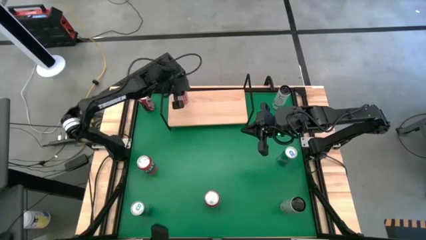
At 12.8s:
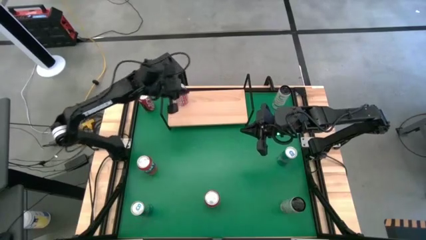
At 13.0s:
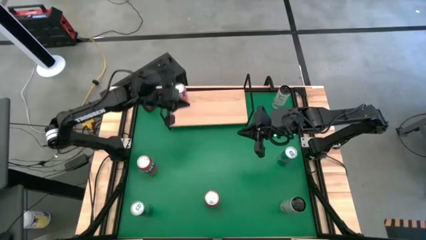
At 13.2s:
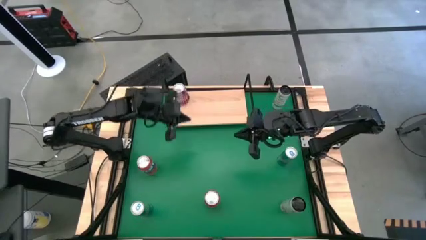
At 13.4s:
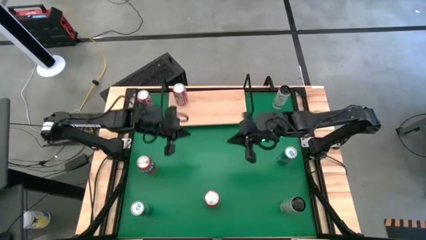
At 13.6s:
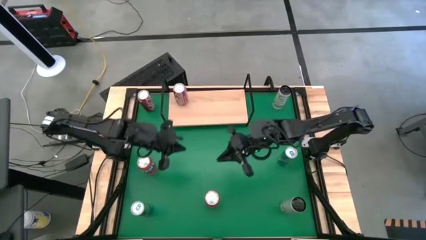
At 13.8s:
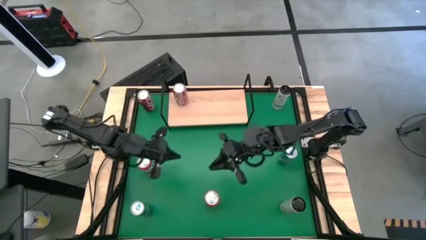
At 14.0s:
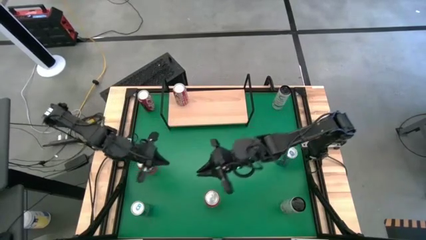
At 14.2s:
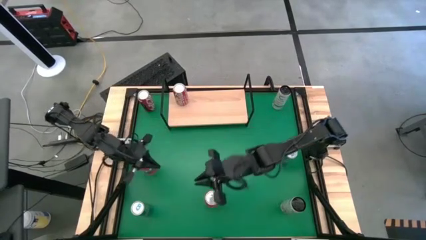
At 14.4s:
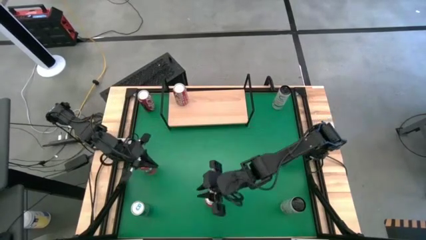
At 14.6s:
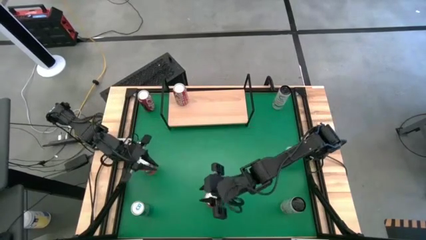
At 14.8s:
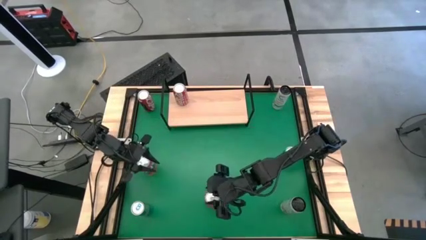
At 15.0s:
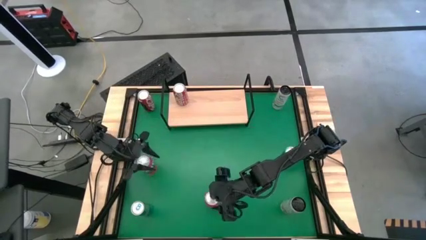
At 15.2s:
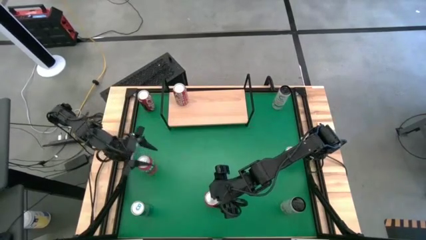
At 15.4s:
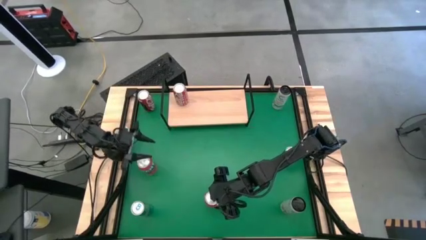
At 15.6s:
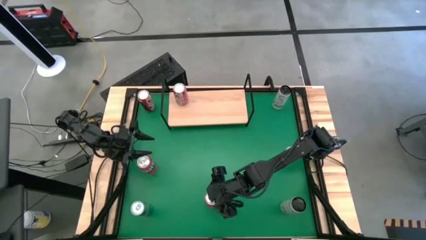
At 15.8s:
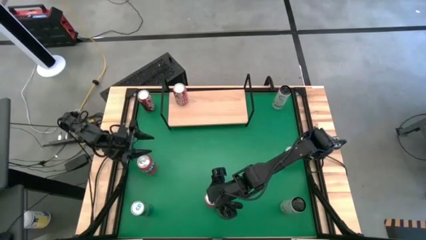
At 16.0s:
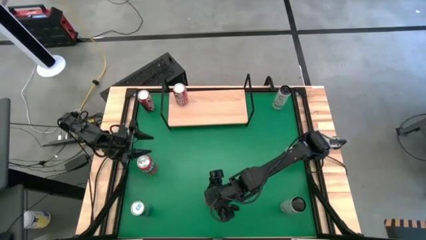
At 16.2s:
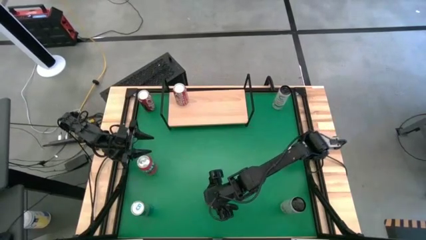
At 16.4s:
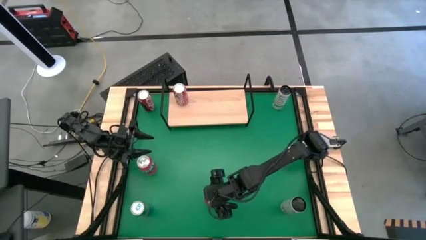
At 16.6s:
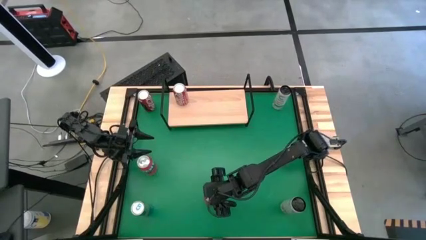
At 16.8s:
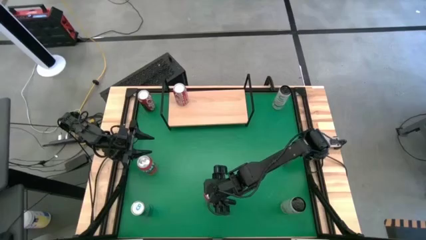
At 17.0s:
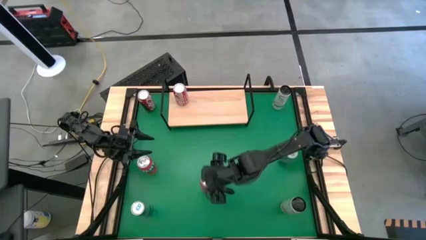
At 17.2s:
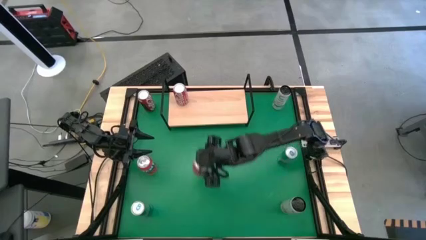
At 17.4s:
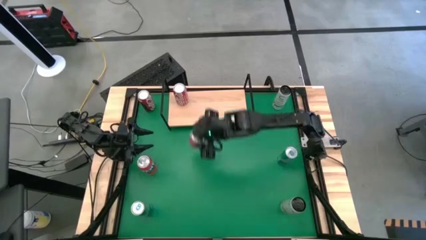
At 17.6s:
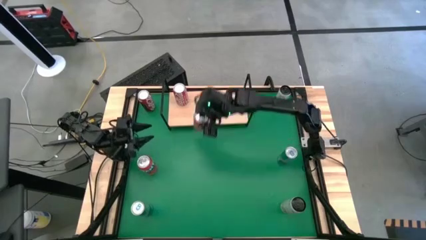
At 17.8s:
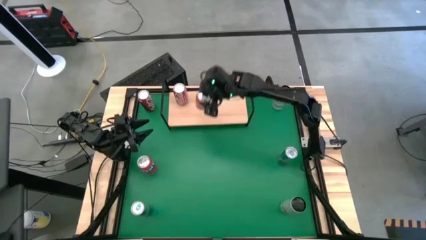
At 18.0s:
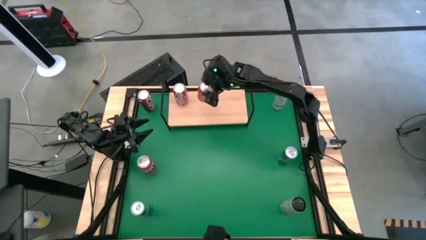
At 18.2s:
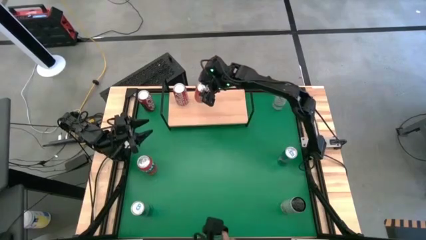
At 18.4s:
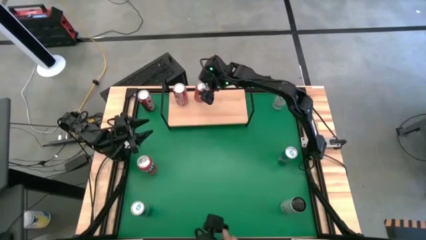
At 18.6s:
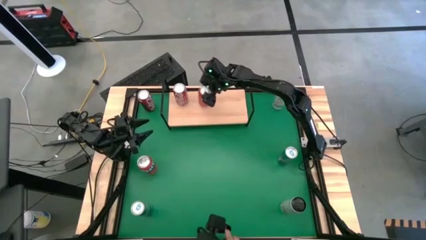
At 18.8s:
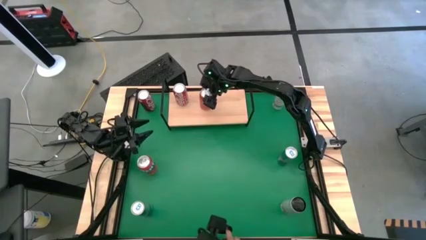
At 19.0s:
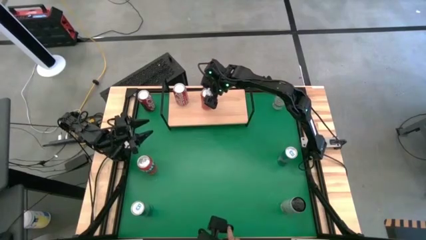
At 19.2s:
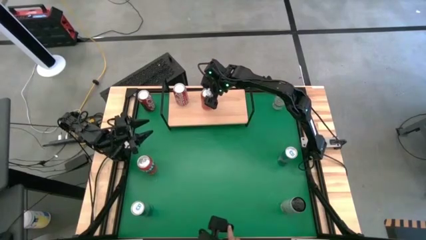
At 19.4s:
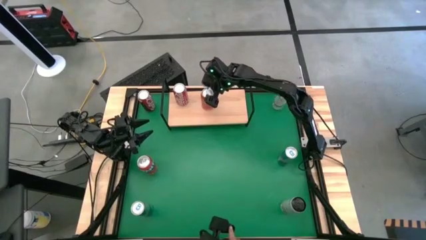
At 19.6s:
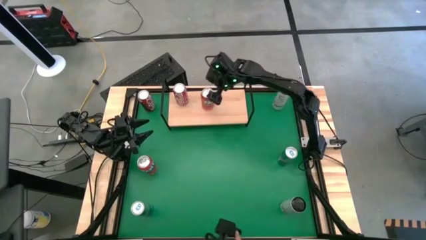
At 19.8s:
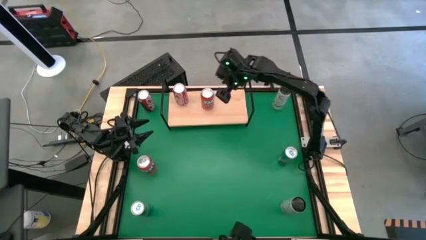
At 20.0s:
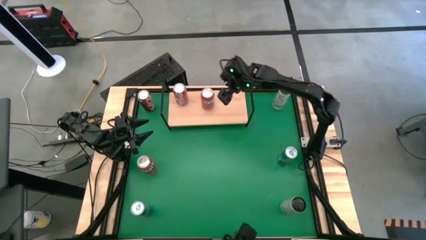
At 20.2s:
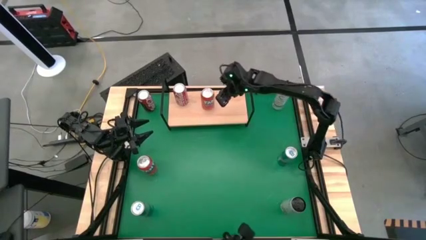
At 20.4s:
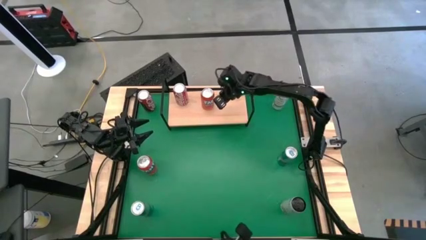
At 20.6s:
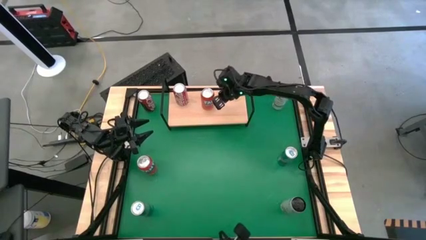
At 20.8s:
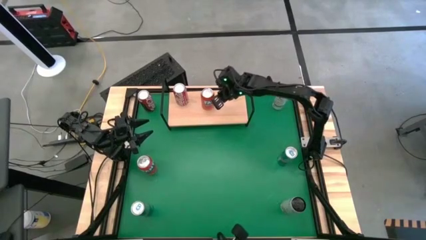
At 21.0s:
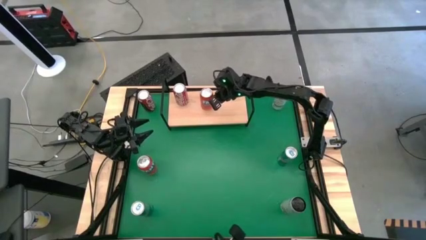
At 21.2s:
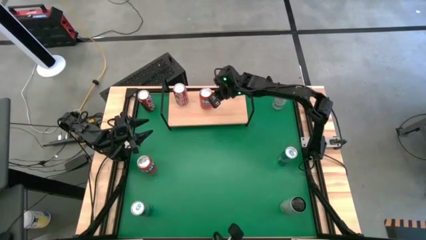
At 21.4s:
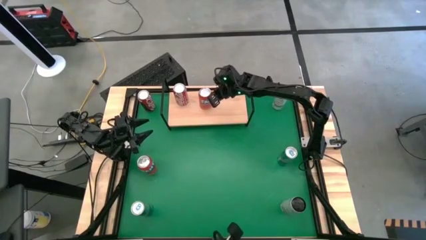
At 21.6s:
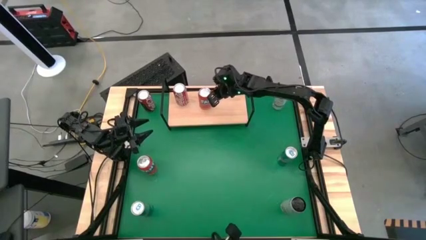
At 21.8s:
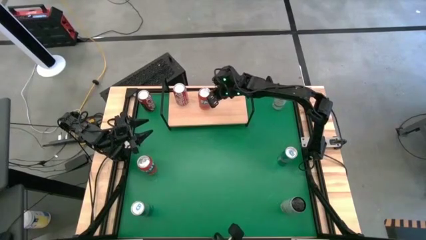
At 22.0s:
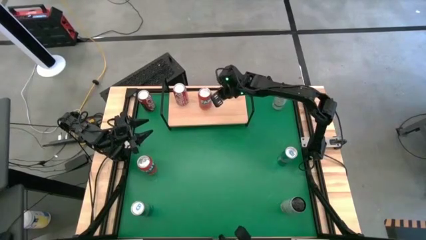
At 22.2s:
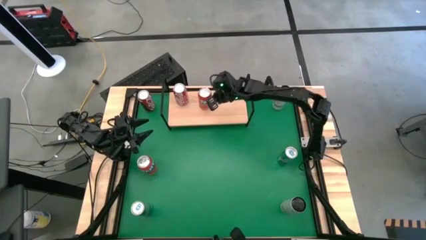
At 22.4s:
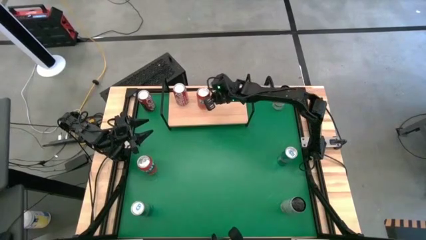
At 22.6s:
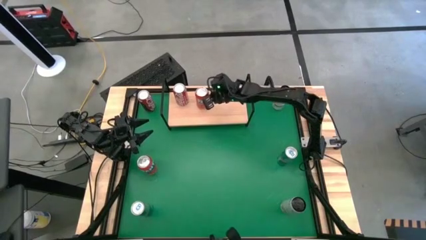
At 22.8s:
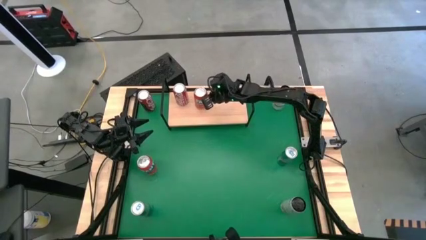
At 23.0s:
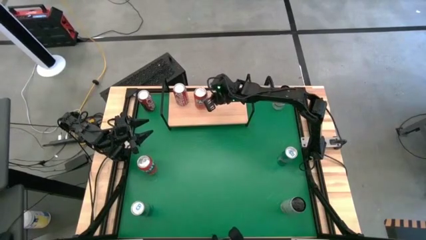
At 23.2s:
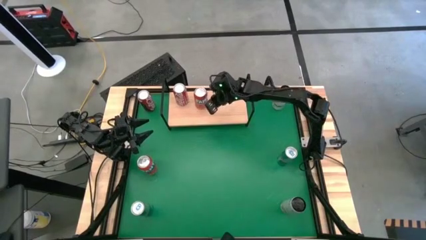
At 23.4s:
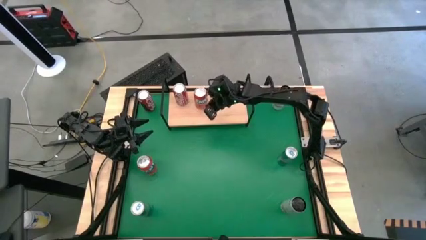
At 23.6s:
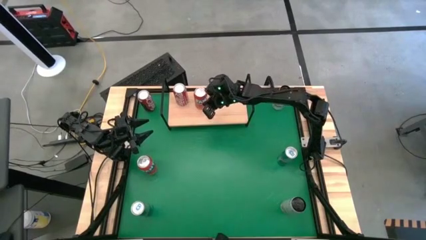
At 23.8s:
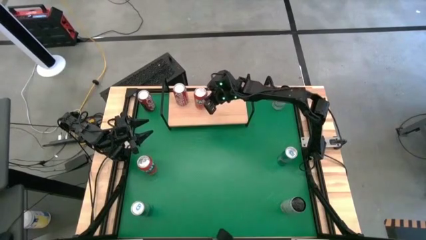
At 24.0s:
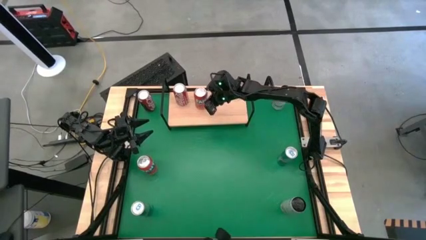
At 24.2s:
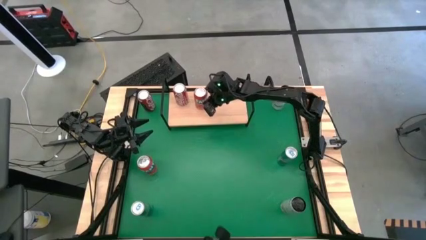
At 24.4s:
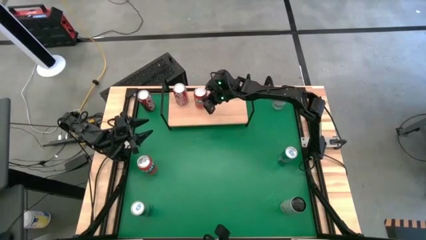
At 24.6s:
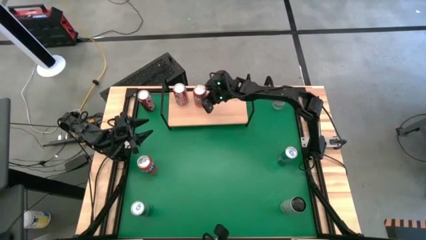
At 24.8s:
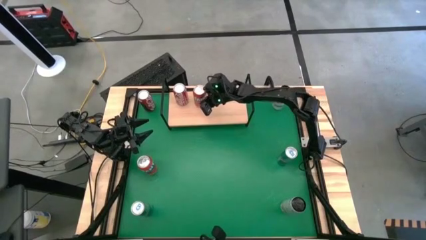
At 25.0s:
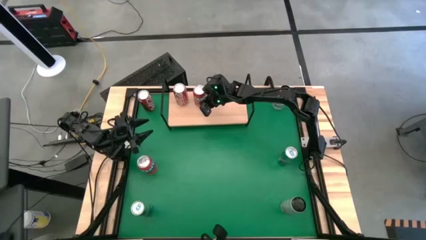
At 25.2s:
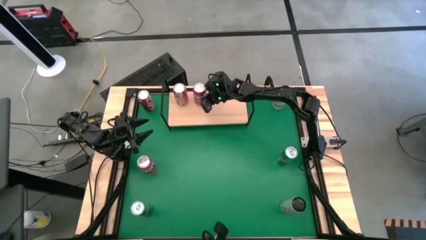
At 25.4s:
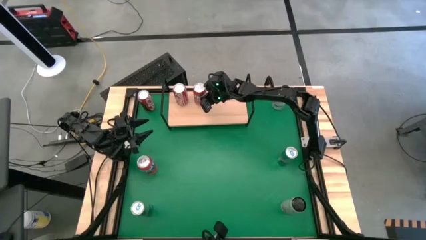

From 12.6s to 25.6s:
Task: Place canned beverage on shelf
Put the bottom red soda can on the shelf

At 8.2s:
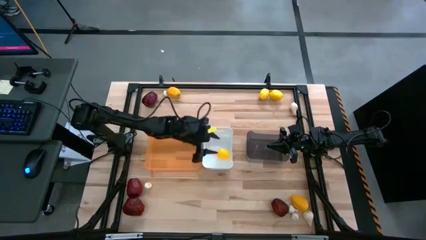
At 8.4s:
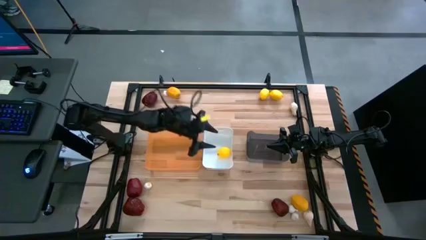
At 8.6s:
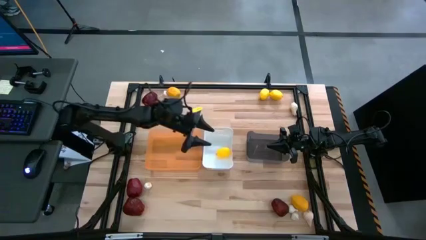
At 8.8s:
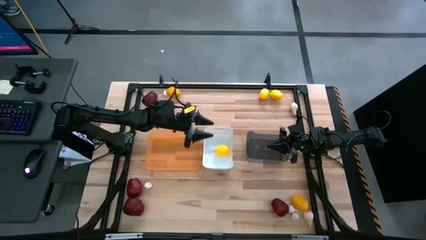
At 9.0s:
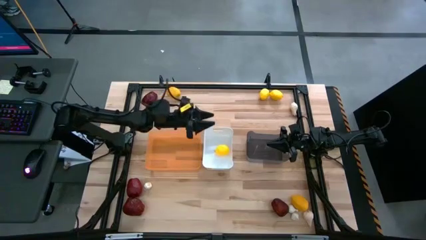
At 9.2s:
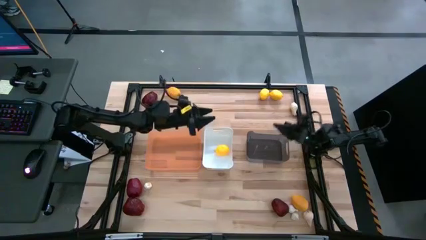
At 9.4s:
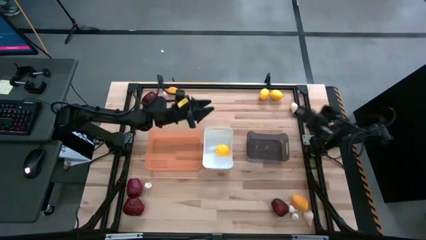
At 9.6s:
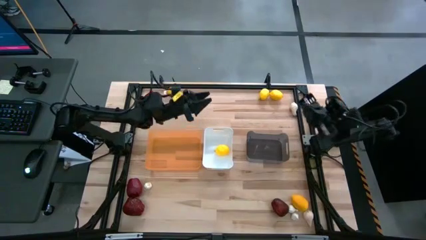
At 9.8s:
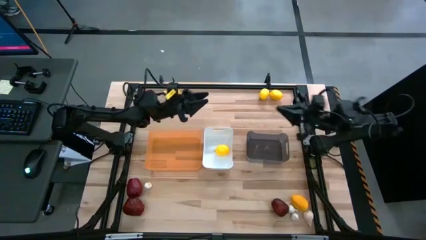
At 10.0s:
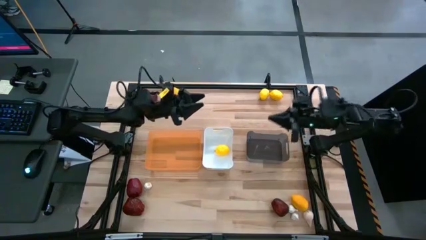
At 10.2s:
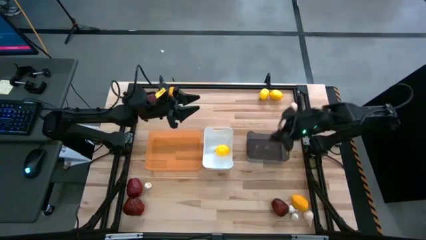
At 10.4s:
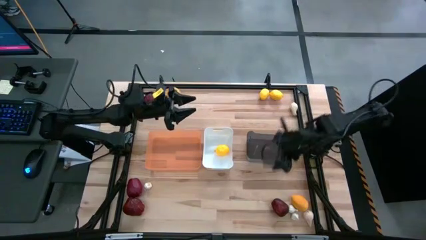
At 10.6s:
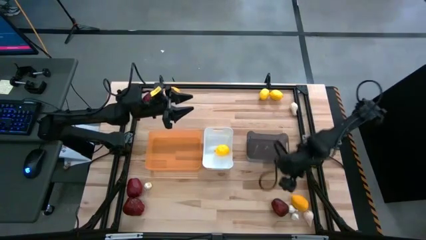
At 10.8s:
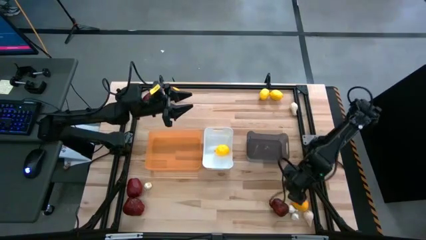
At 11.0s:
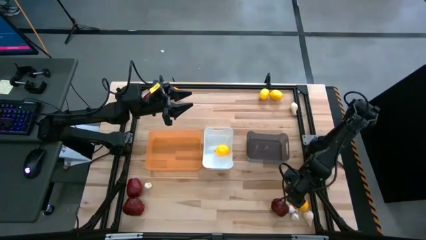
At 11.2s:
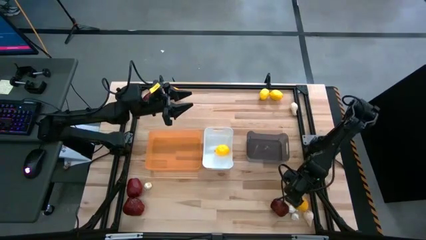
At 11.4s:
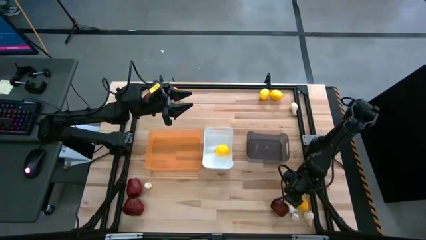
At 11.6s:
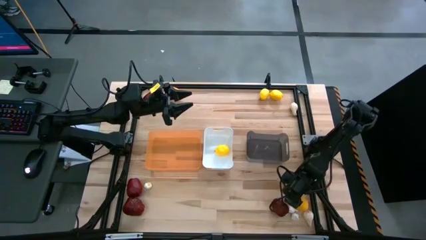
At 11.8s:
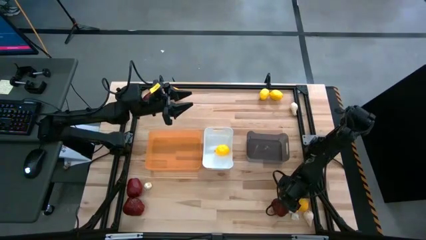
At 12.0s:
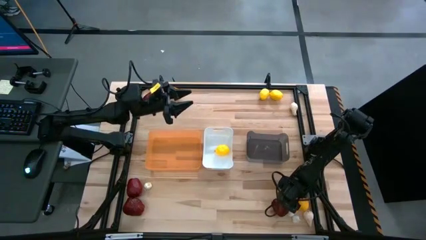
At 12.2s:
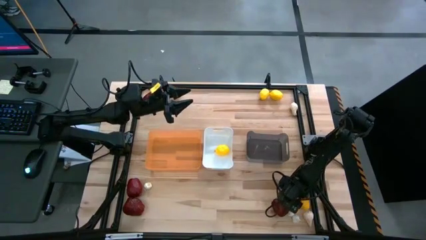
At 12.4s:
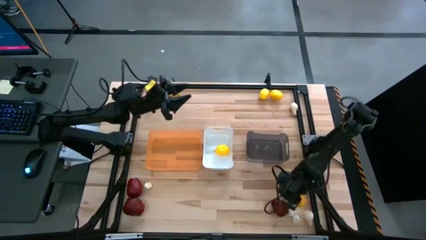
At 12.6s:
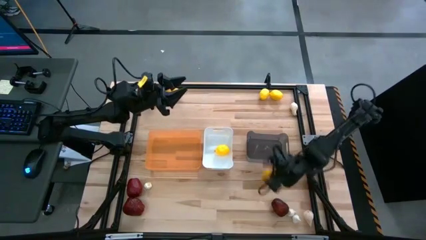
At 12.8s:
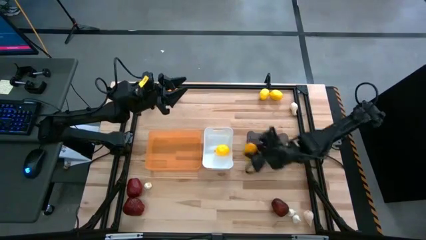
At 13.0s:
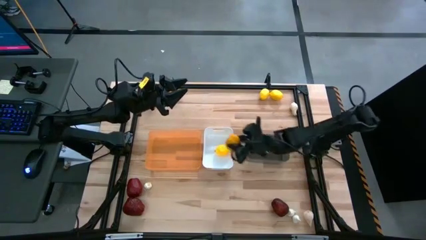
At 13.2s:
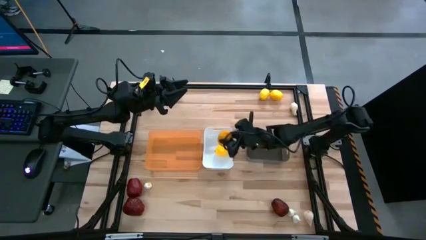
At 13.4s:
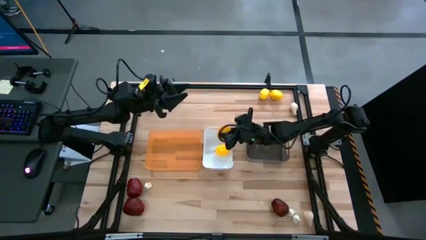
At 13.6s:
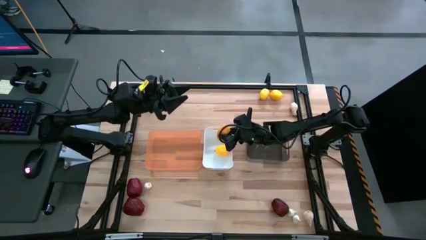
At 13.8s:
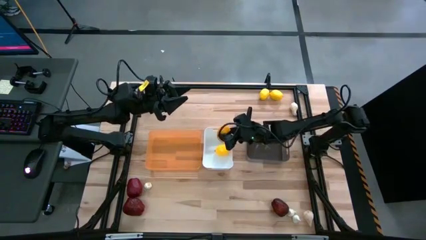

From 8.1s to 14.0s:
Task: Sort produce into baskets
Put the yellow lemon into the white bin
